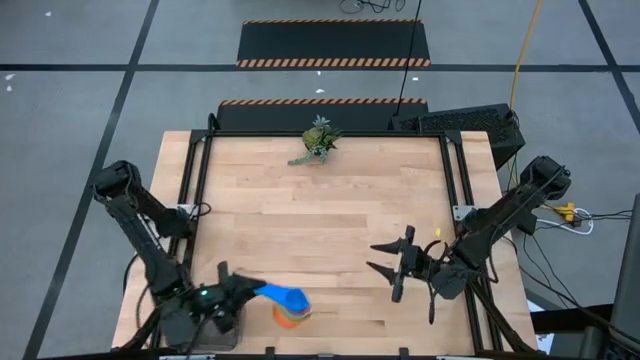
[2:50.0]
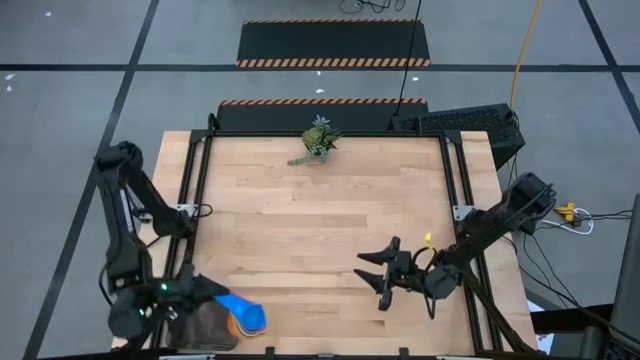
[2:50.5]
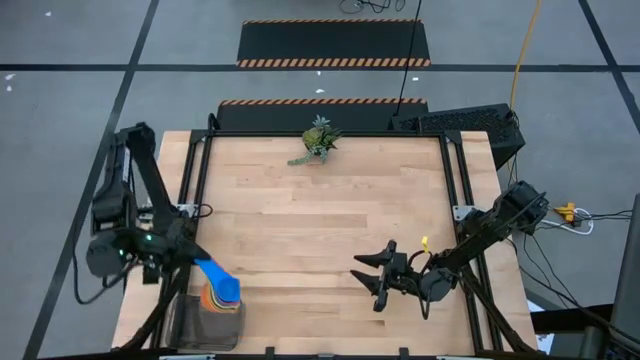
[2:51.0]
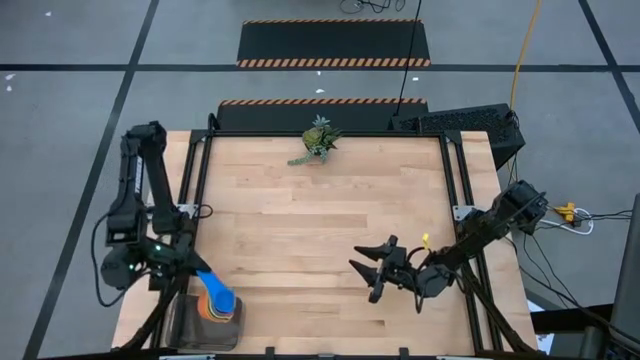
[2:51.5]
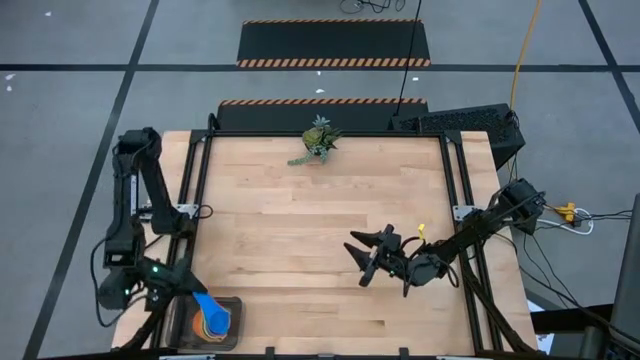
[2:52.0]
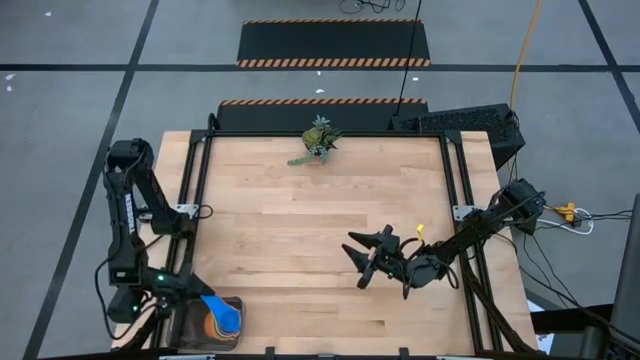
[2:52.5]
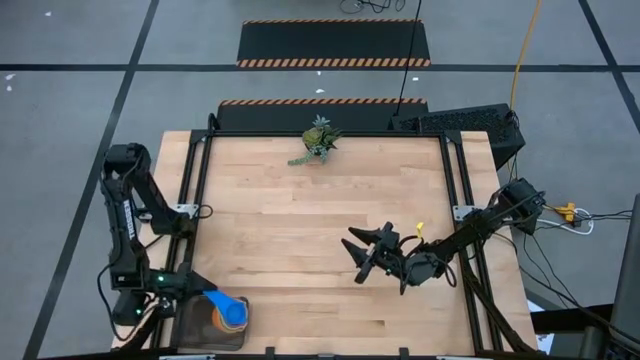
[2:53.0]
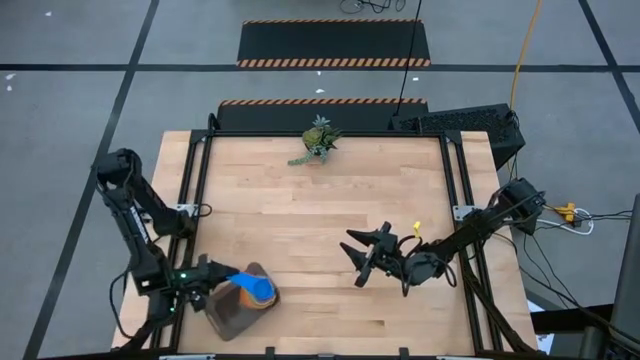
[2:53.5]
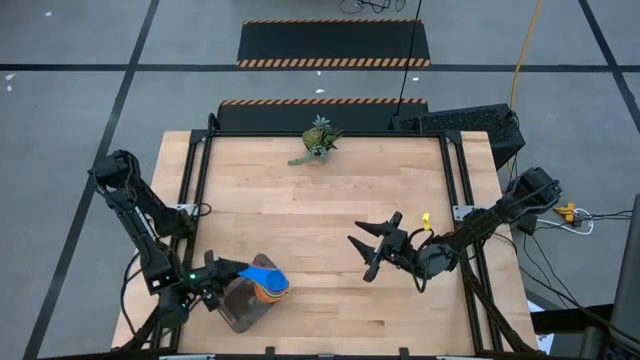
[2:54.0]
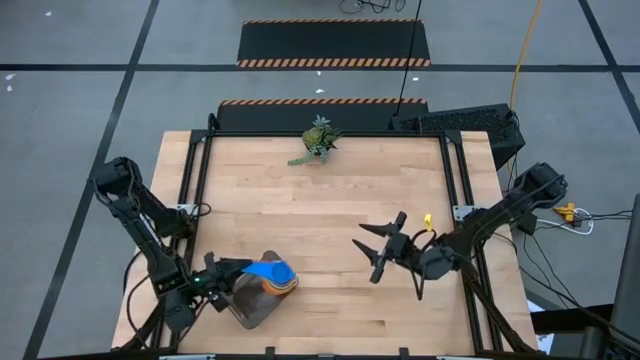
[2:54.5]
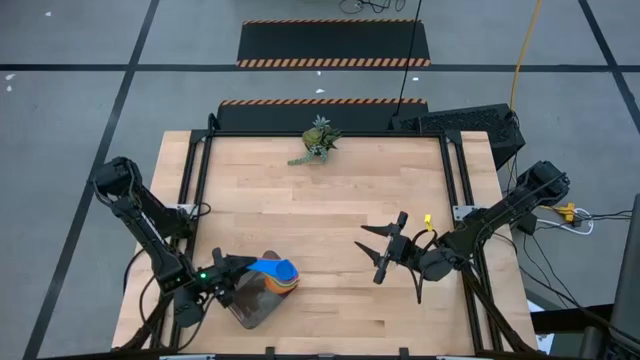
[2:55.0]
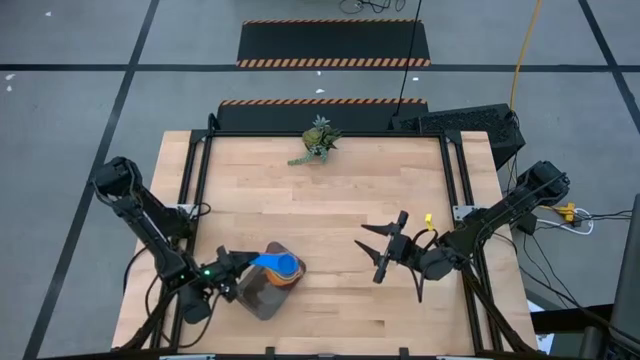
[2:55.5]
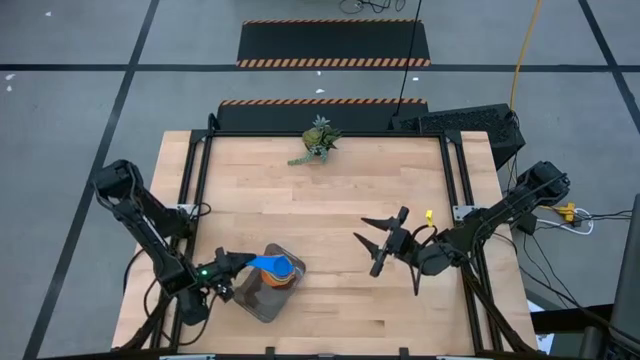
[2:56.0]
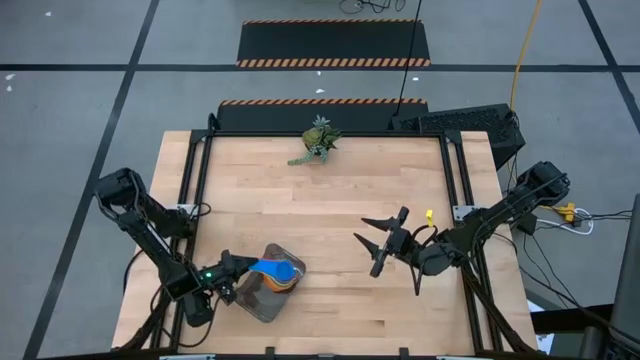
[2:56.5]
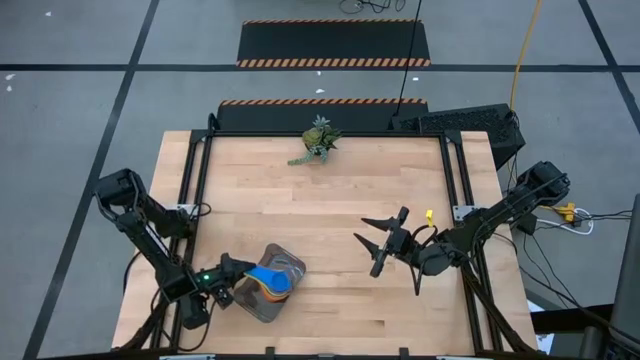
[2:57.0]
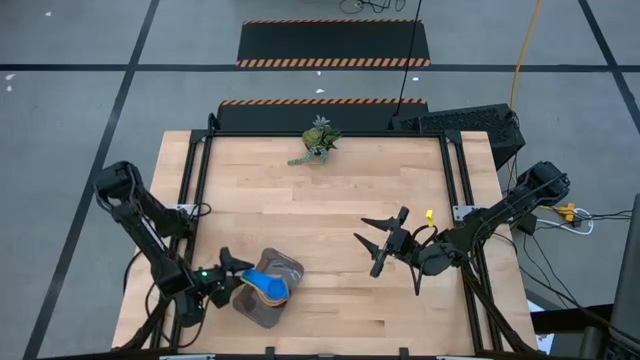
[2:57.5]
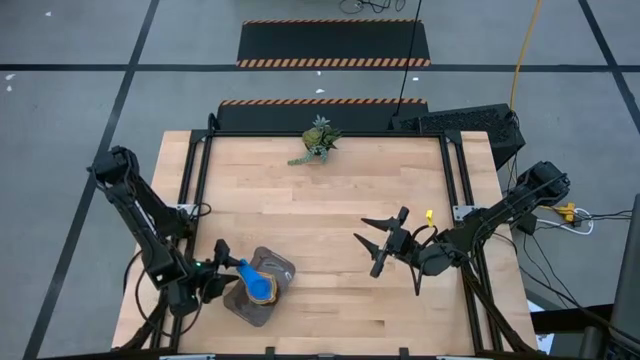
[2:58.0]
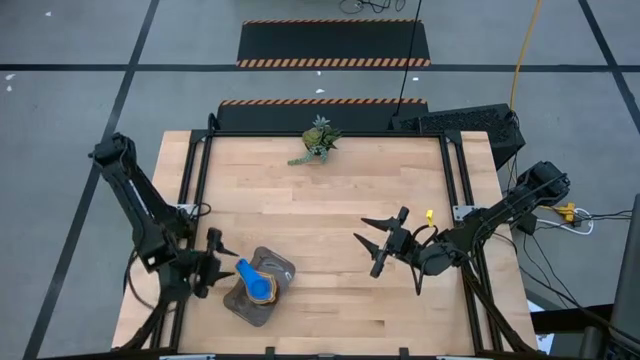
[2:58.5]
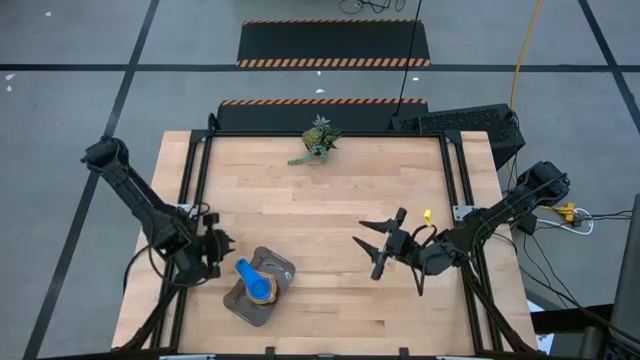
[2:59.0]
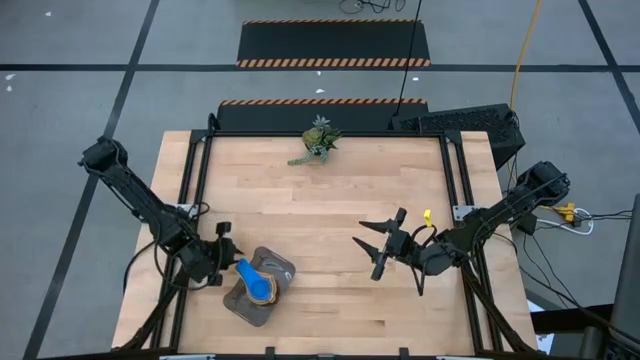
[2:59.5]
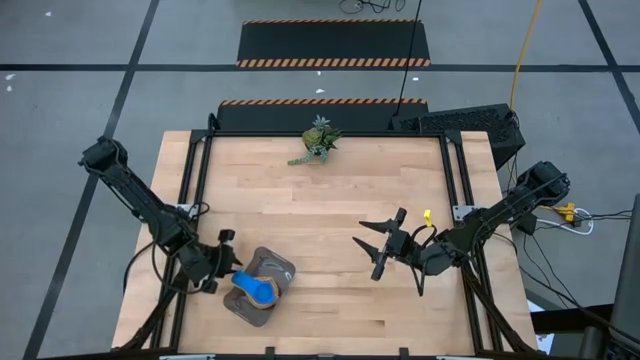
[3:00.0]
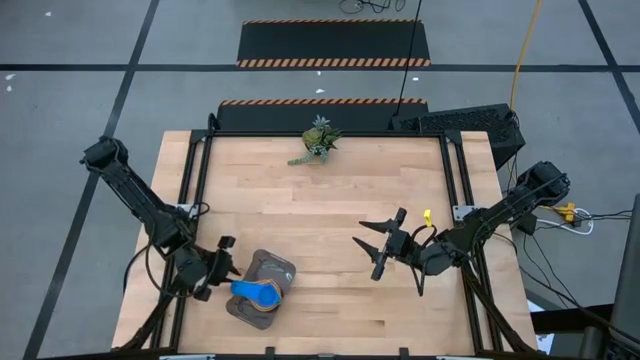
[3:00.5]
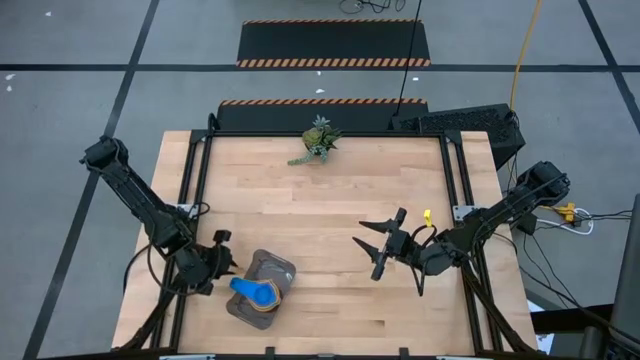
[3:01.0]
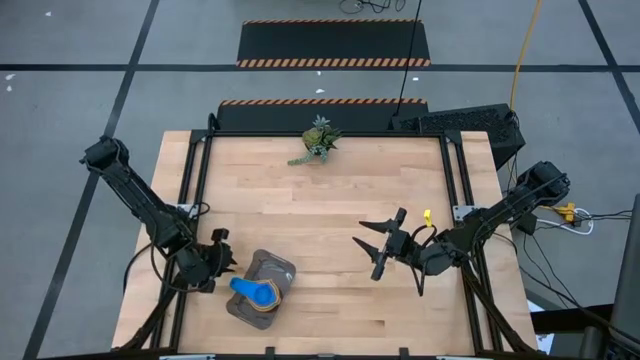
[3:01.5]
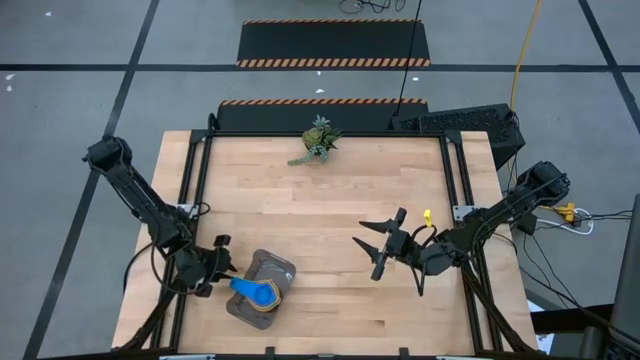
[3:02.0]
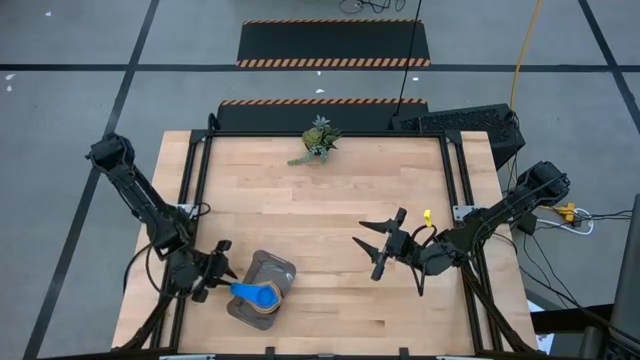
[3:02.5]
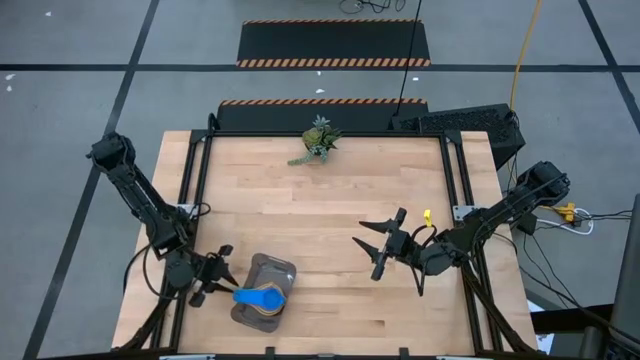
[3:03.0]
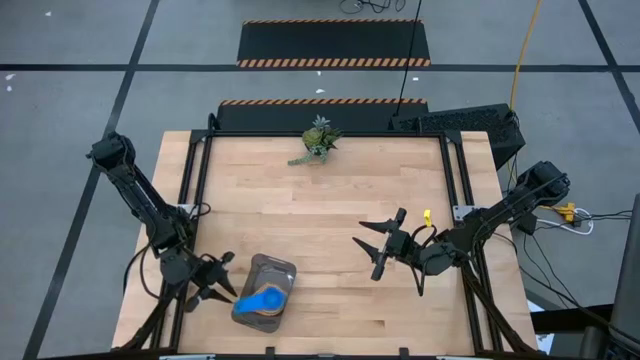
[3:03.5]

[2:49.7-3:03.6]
Task: Nest measuring cups in basket
Put the nested measuring cups into the black bin

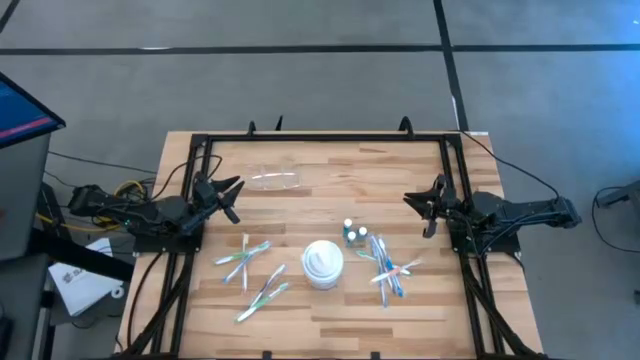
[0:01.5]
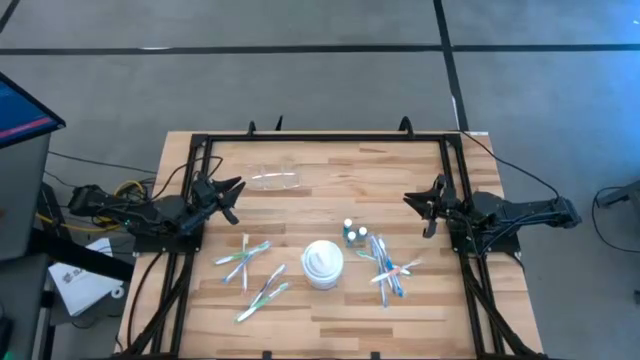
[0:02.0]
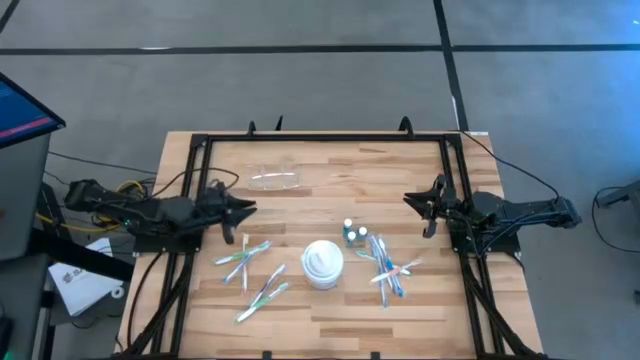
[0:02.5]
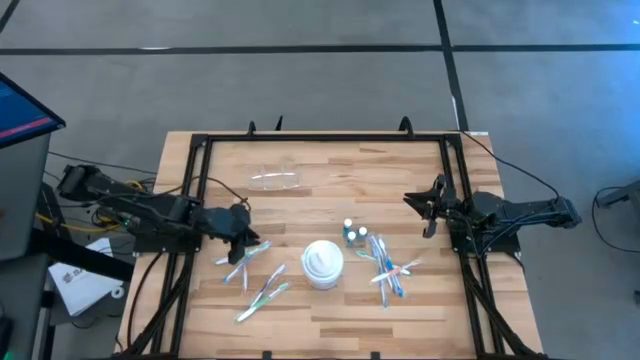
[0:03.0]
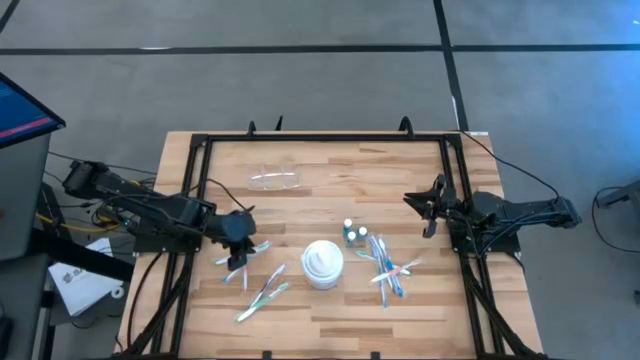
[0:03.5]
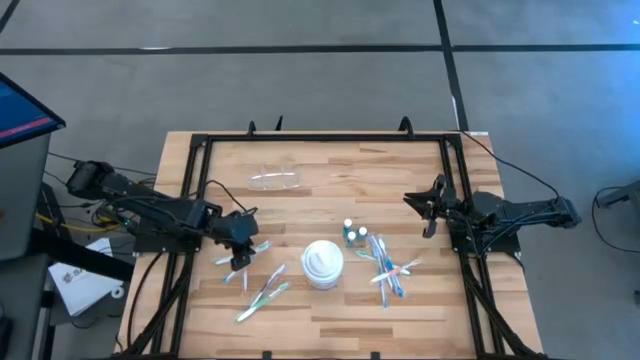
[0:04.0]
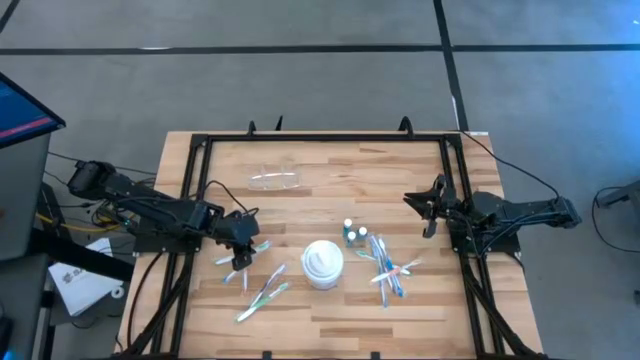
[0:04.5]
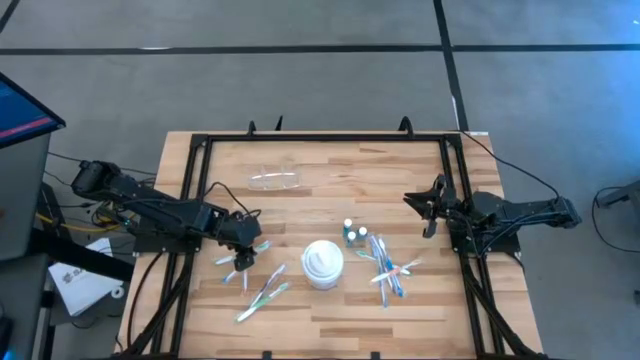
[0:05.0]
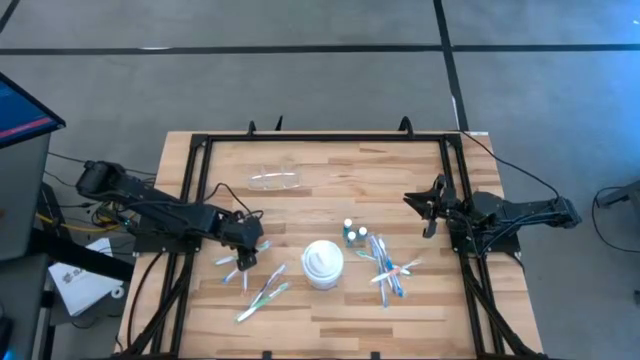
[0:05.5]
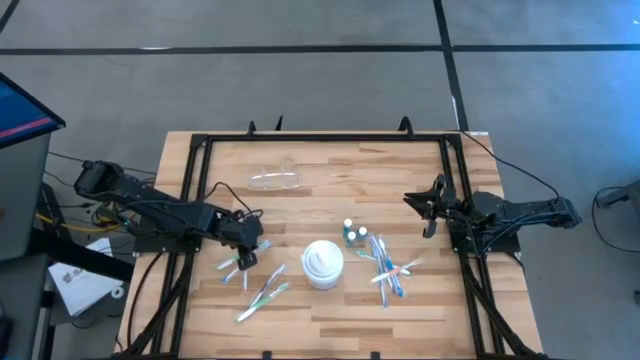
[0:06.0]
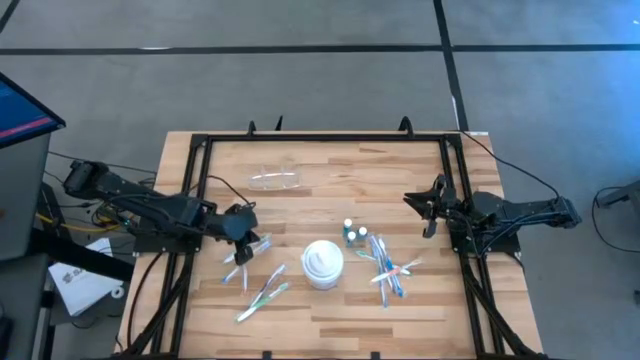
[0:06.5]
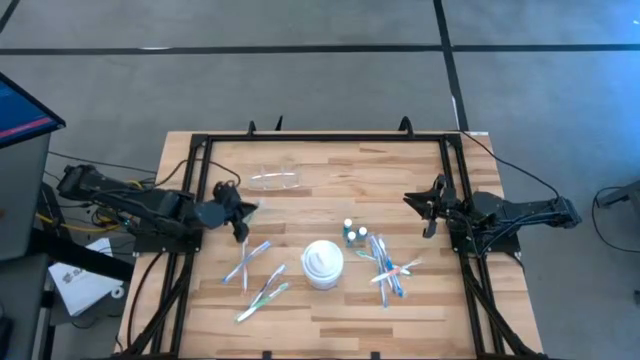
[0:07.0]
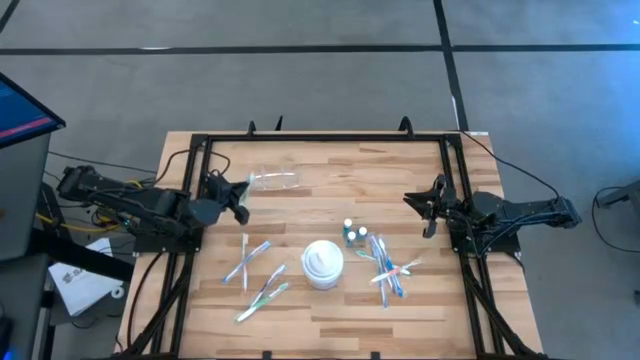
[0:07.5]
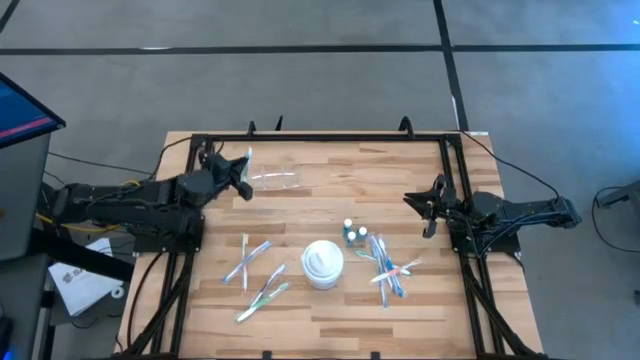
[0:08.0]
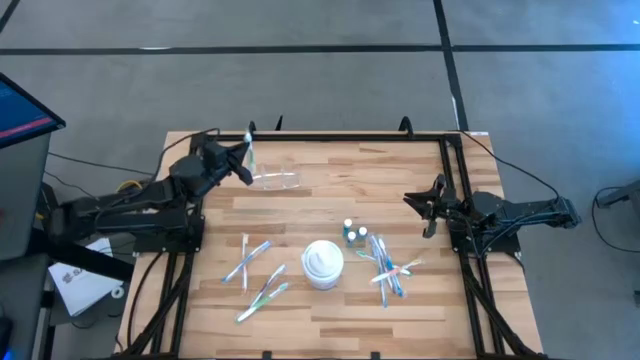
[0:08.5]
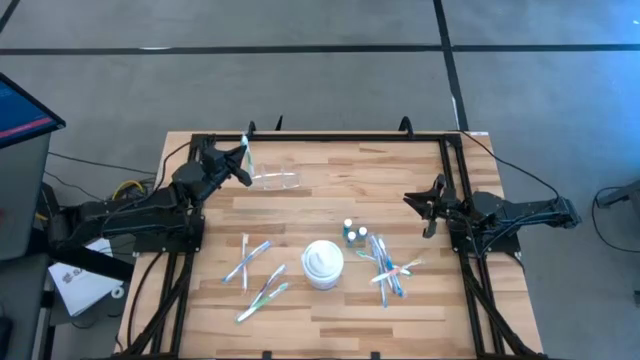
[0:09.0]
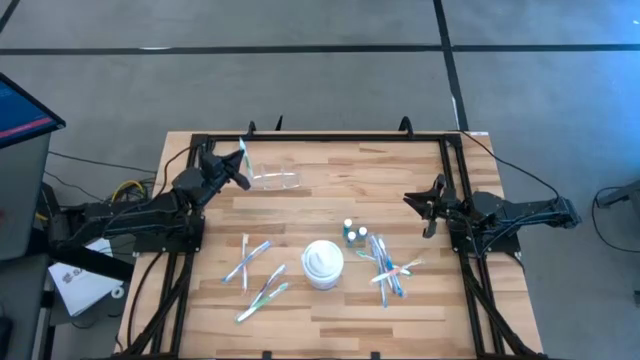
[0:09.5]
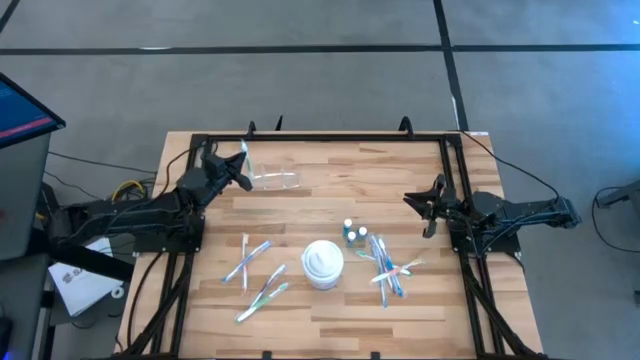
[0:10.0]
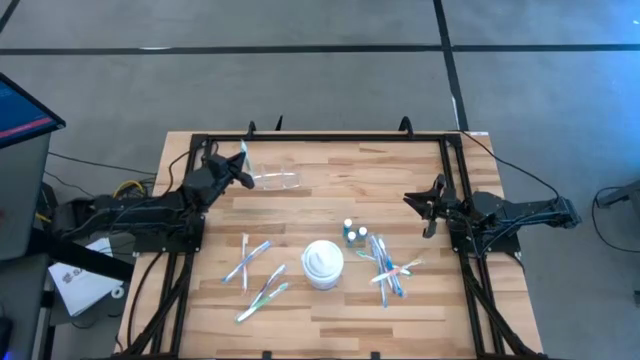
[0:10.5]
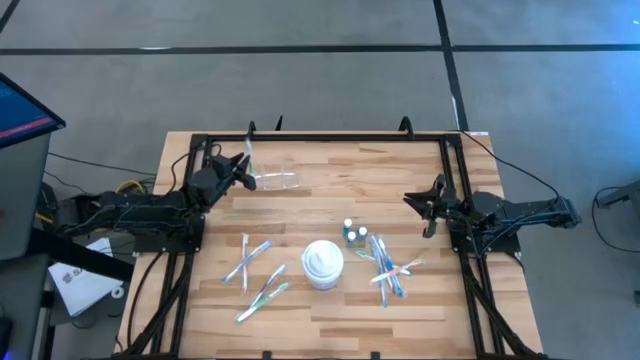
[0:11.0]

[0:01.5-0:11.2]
Task: Pick & Place toothbrushing station
Put the top left green toothbrush into the transparent organizer
